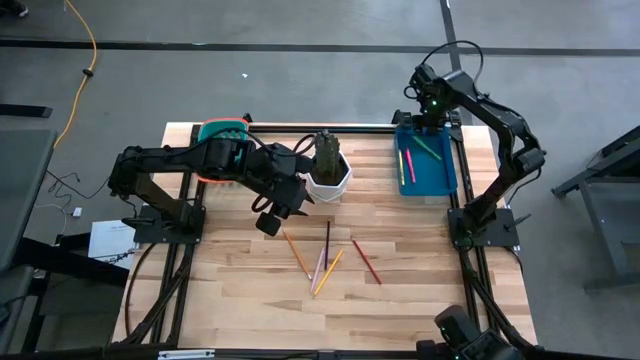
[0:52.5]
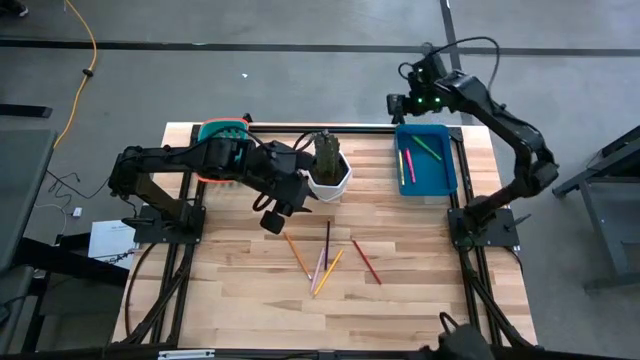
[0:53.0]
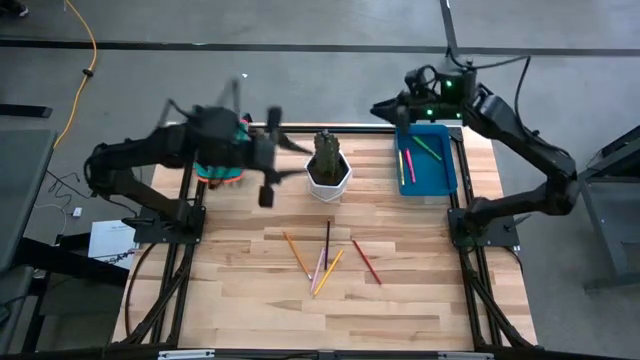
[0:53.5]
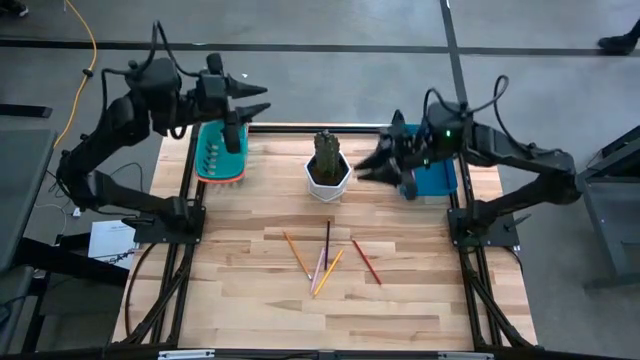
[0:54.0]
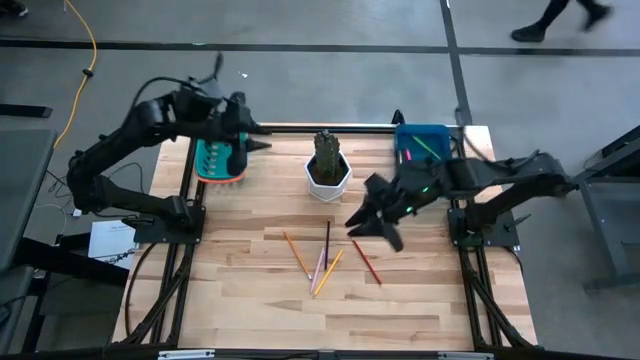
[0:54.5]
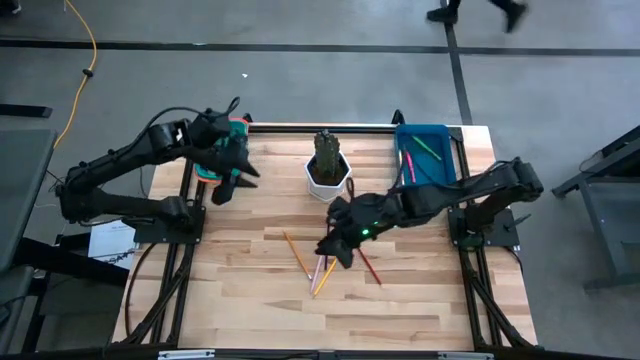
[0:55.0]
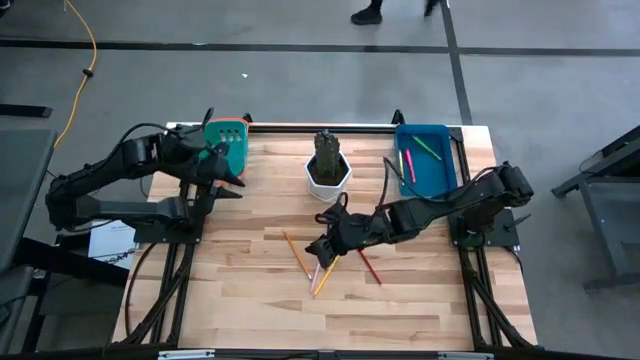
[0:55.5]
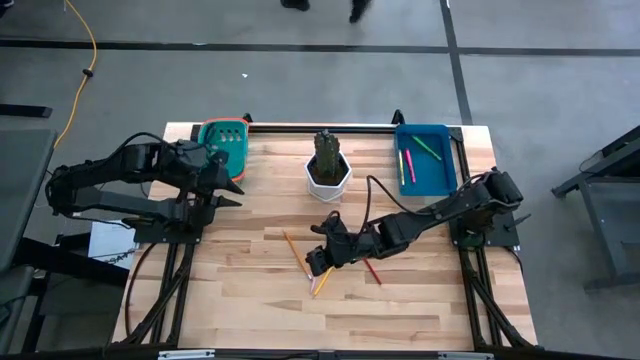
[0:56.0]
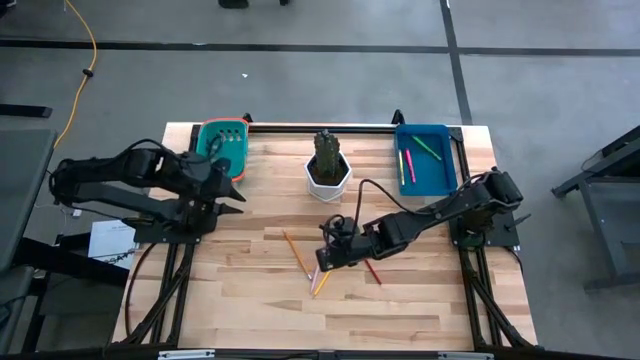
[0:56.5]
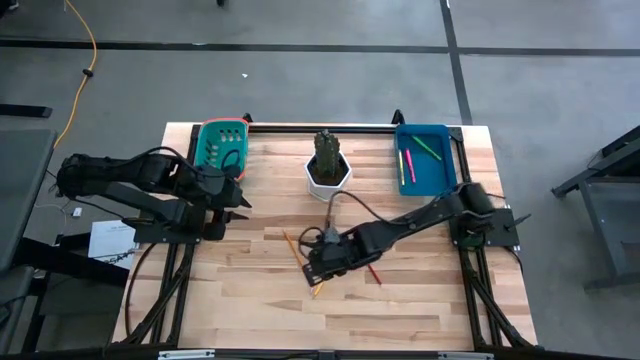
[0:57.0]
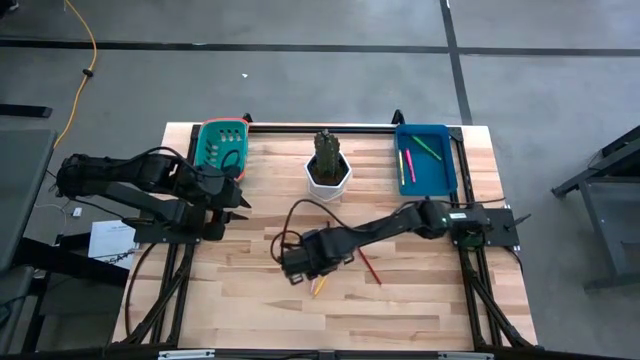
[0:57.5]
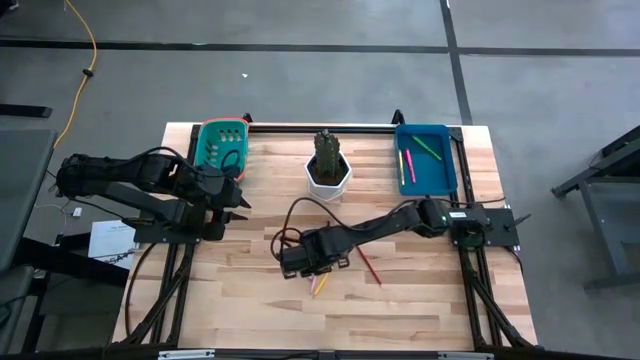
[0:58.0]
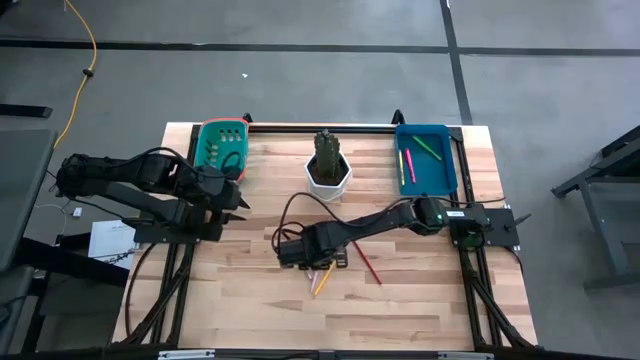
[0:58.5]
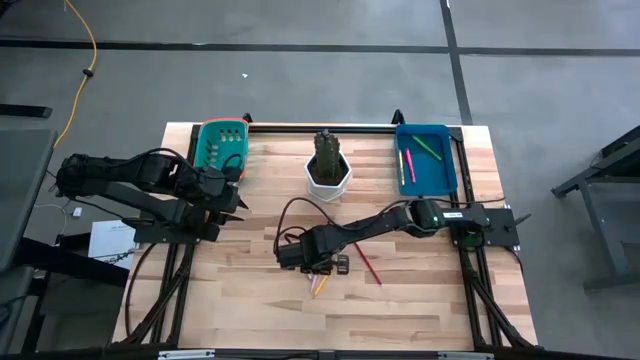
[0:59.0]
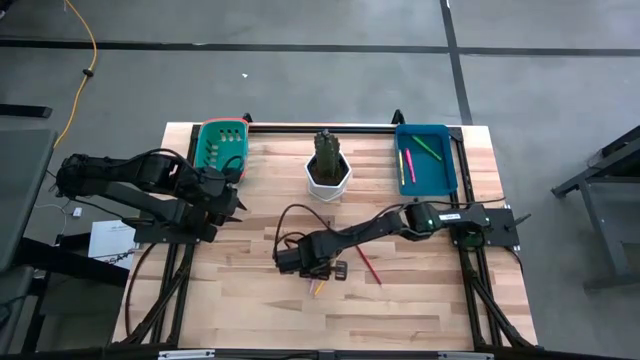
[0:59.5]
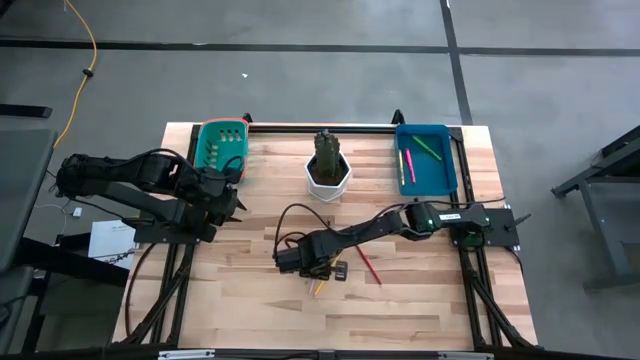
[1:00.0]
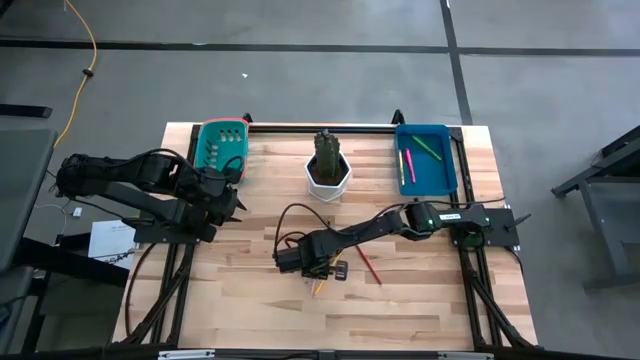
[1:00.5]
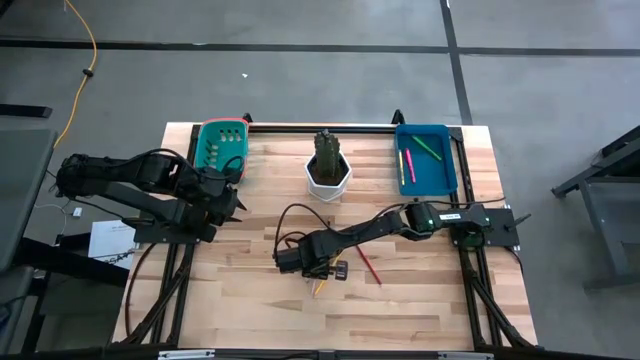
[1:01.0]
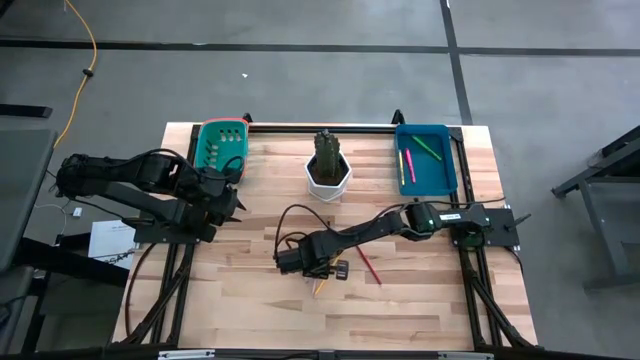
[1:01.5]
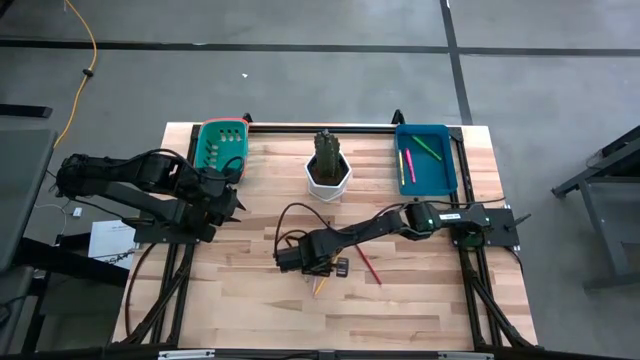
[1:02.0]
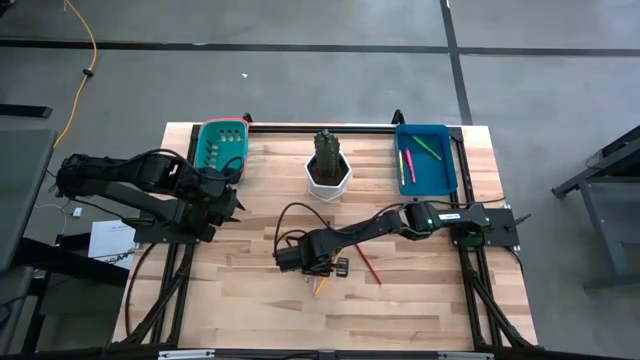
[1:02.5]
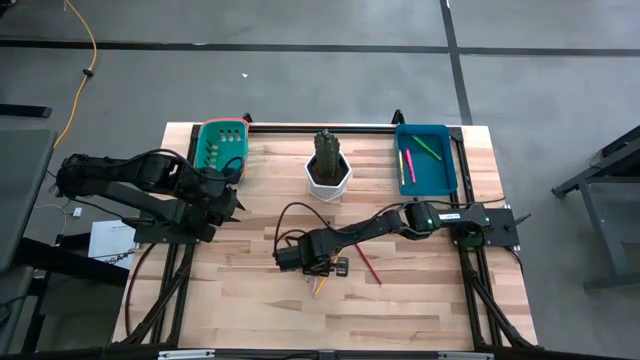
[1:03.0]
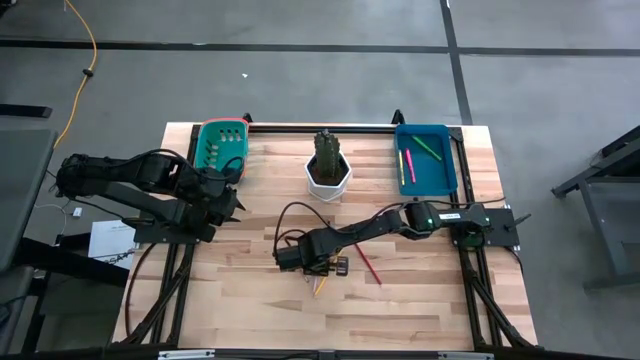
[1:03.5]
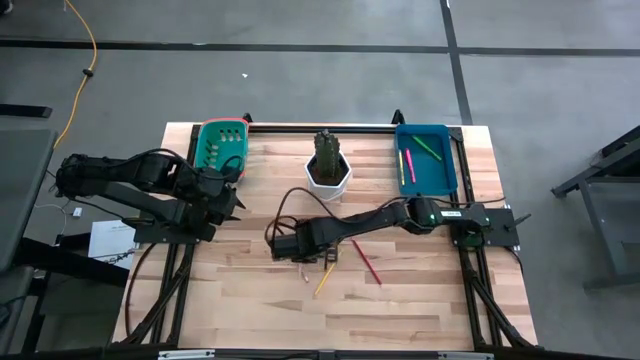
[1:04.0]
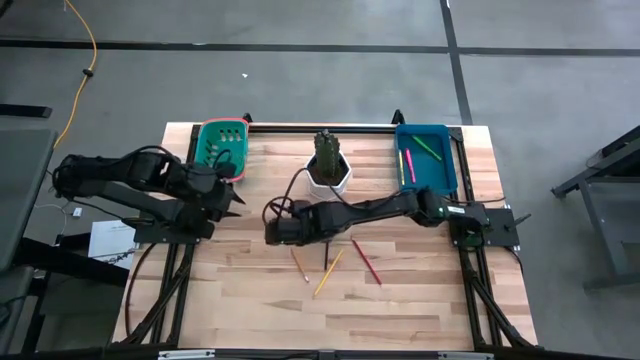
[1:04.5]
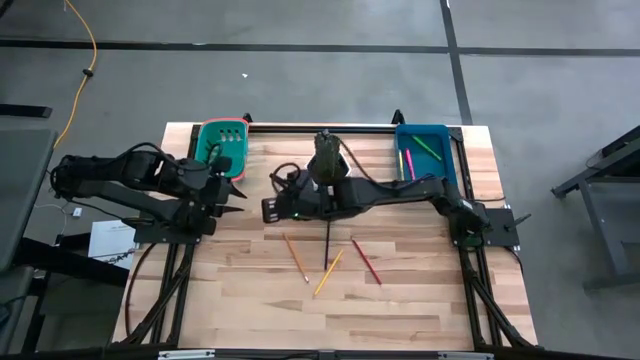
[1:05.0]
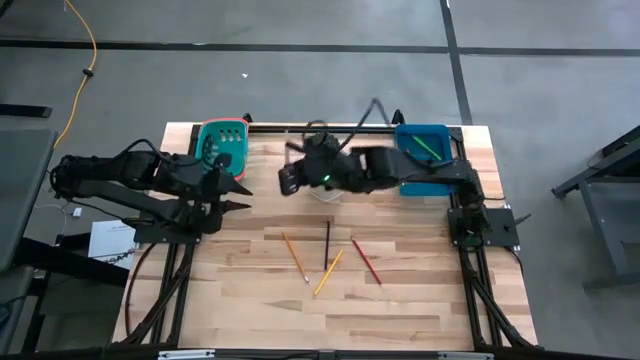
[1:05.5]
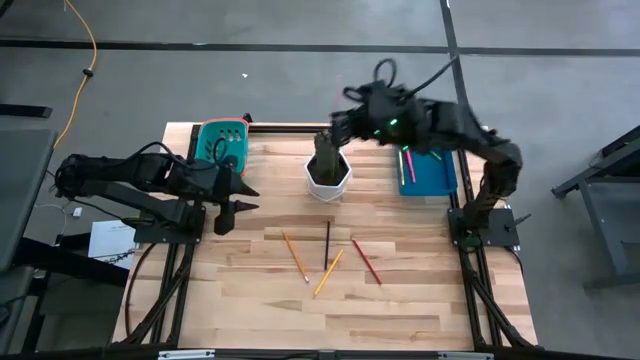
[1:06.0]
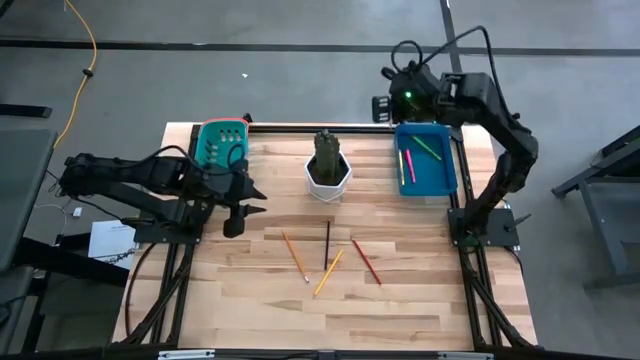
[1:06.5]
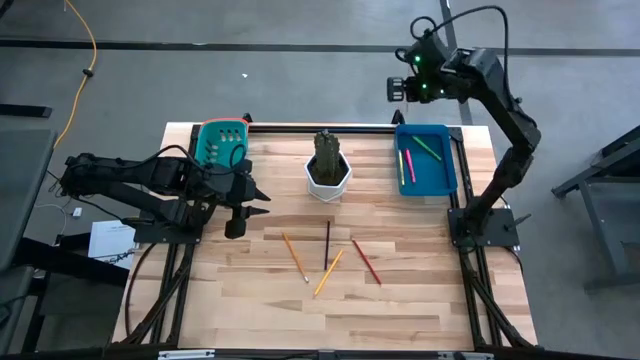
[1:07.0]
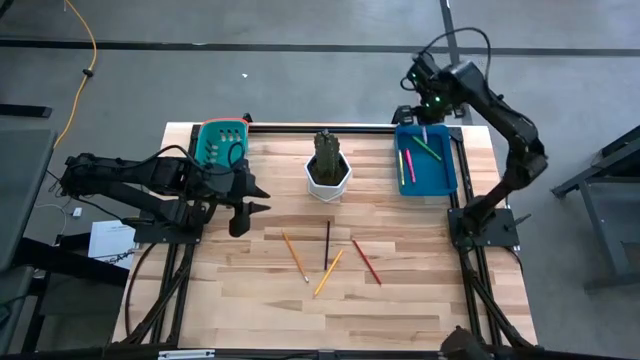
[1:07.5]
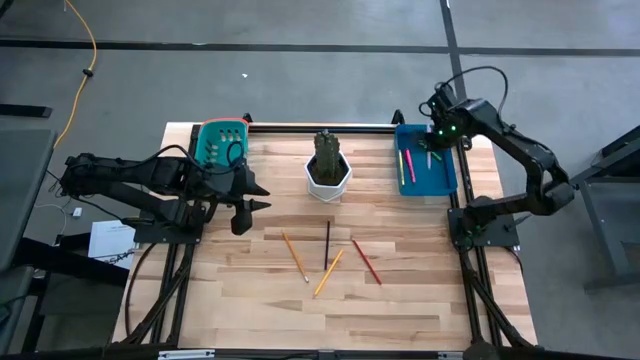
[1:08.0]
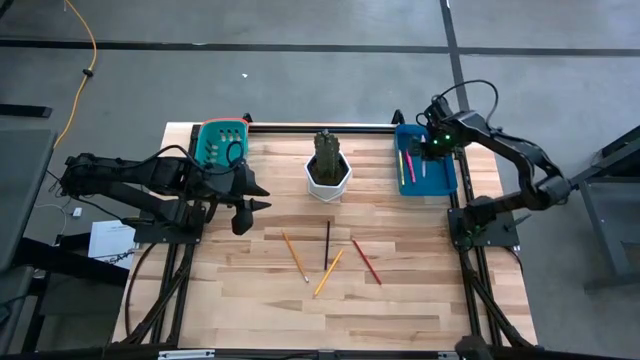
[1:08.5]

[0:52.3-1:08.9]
Task: Sort pens & pencils
Put the pink pen into the blue bin
